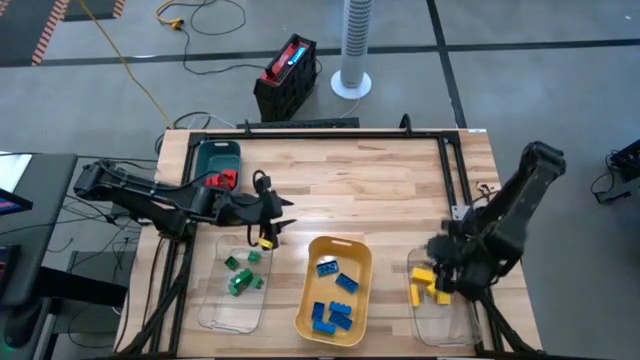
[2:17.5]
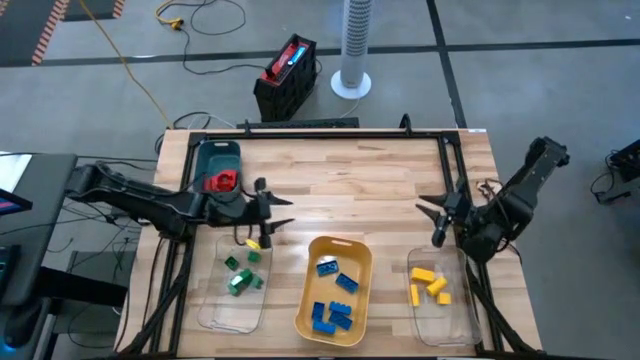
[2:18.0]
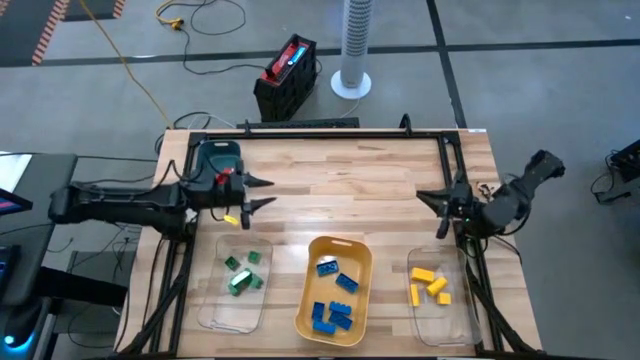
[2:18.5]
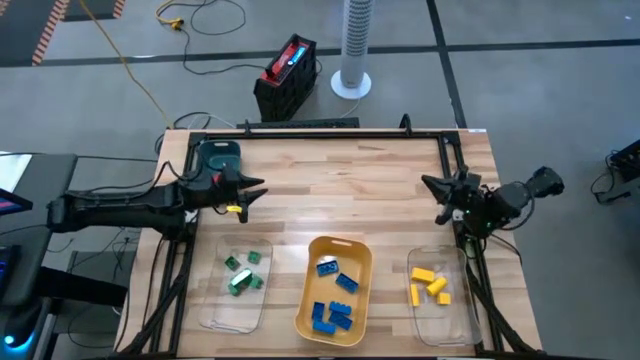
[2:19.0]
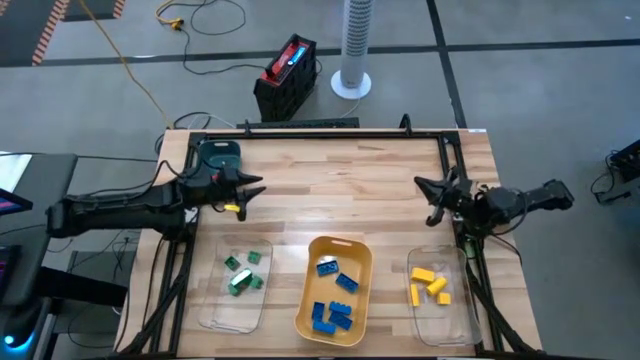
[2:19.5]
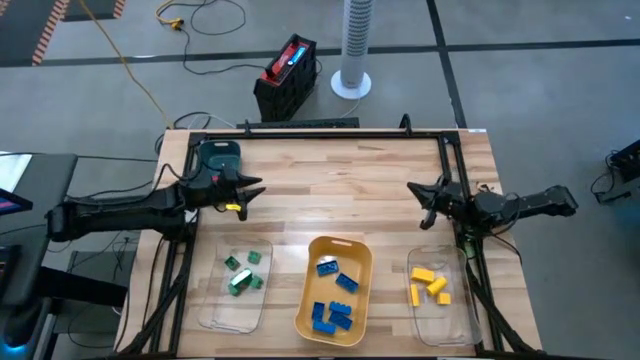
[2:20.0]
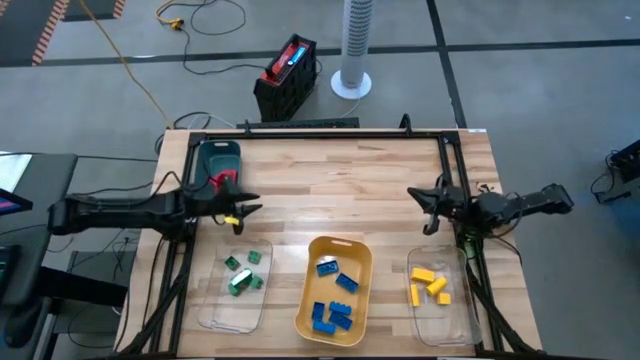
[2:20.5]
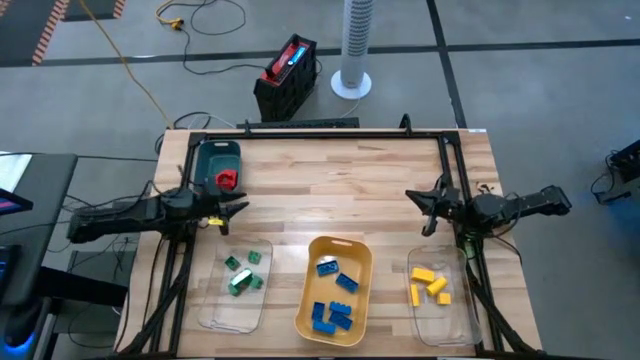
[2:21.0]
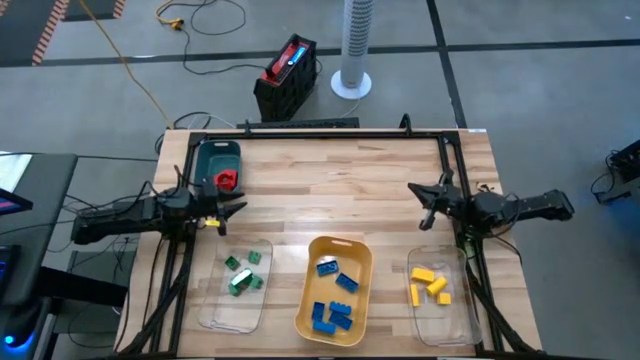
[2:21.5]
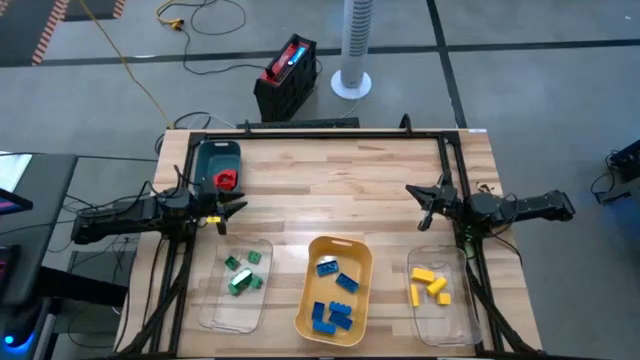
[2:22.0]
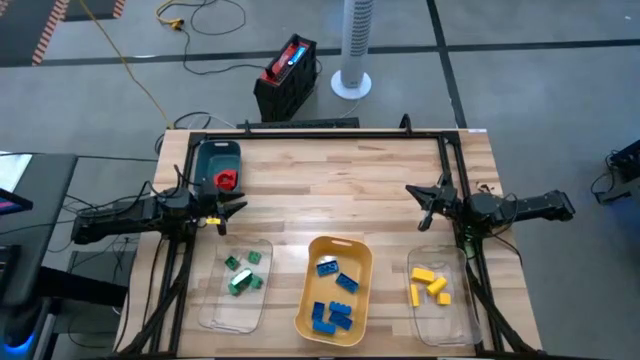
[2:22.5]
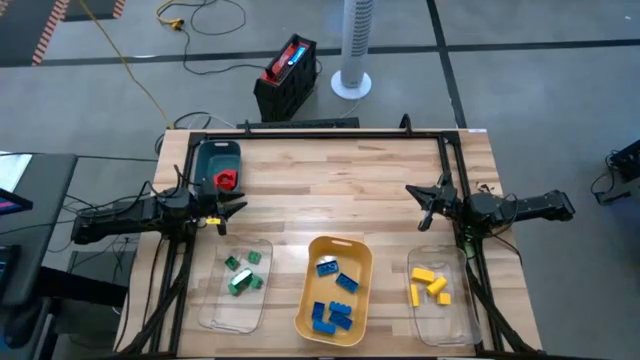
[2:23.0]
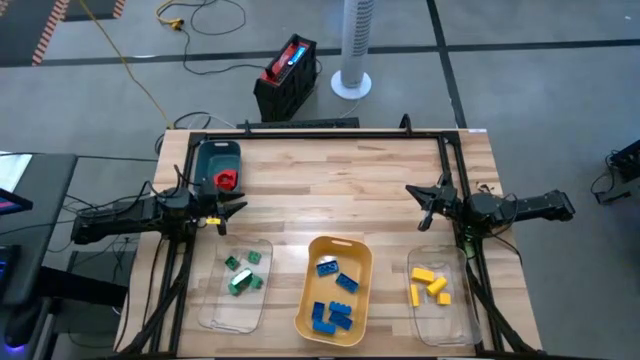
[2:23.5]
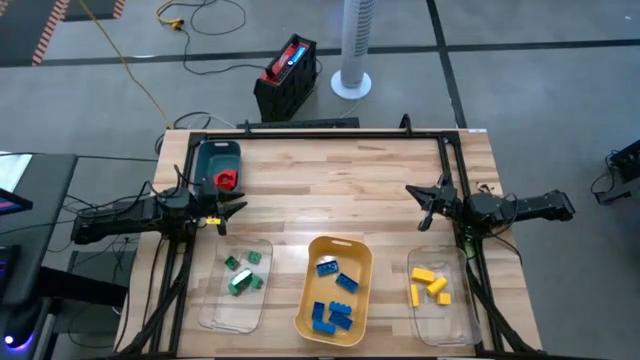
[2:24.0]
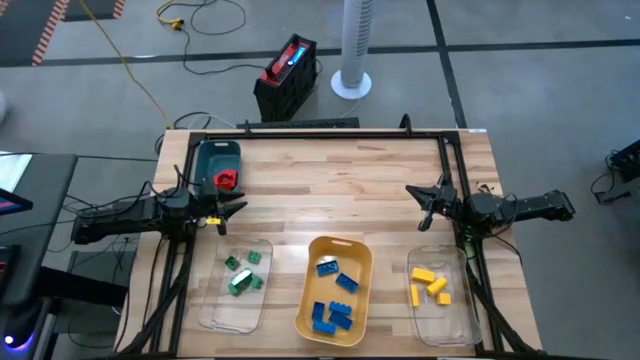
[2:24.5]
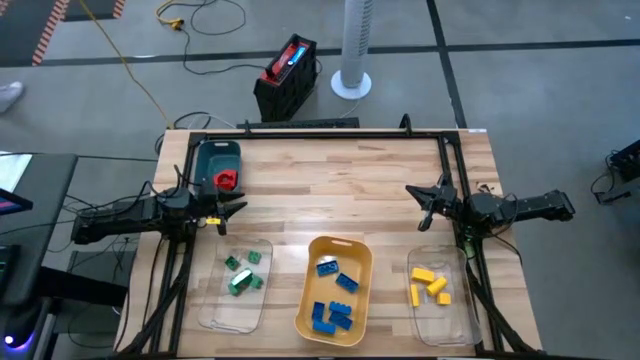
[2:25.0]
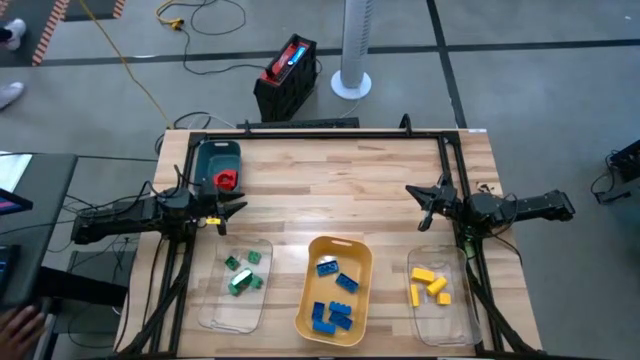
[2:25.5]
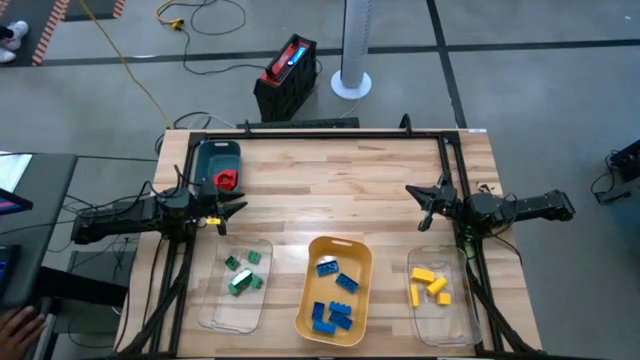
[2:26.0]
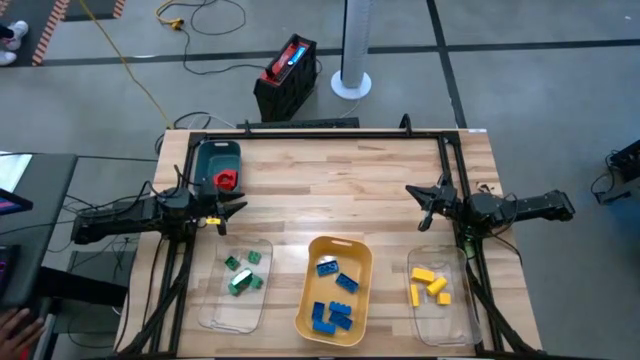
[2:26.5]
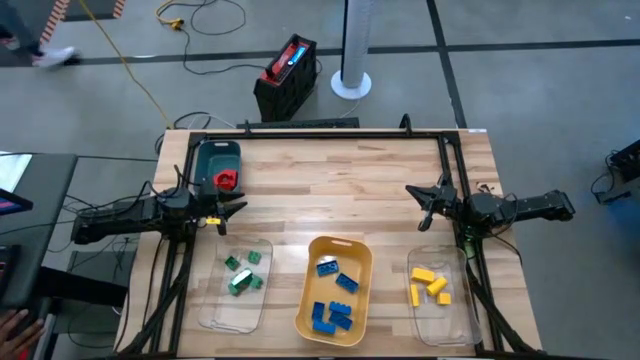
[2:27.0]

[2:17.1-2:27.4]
Task: Sort blocks
Return to Home Position

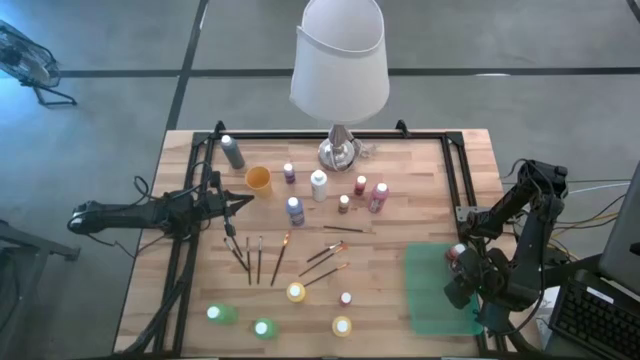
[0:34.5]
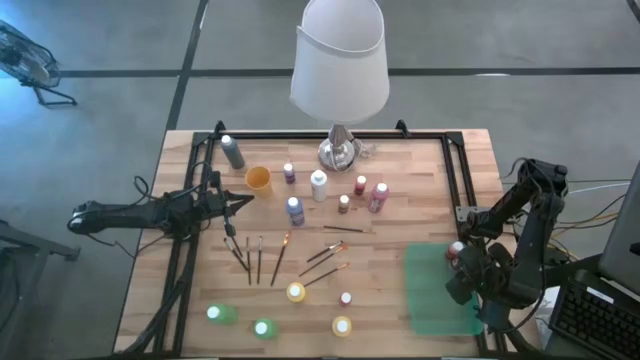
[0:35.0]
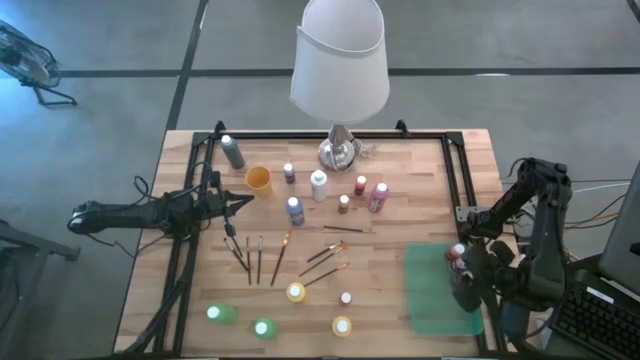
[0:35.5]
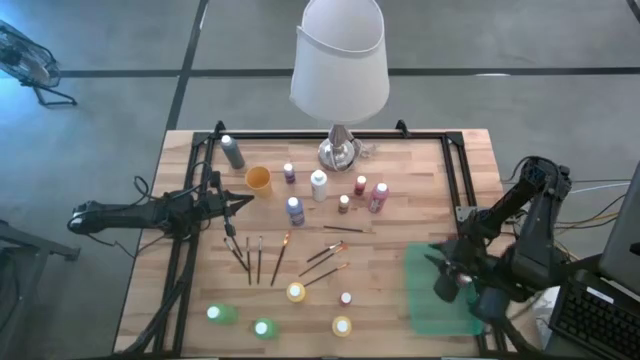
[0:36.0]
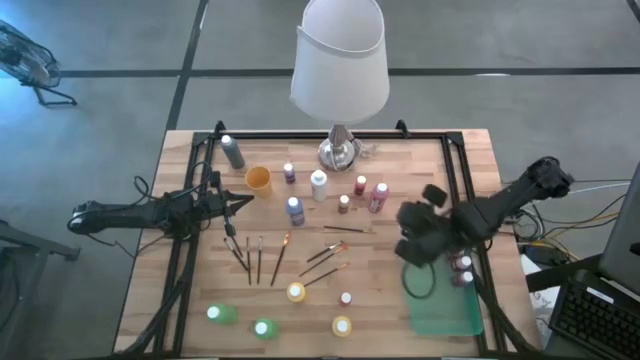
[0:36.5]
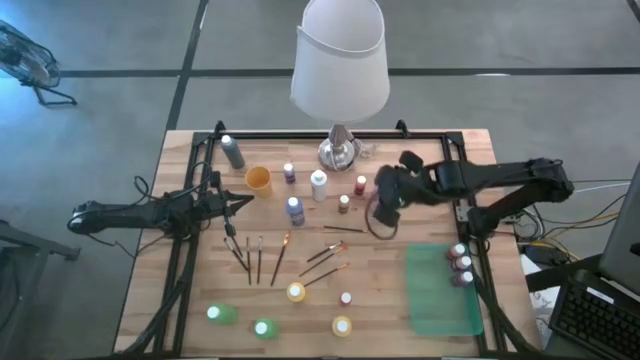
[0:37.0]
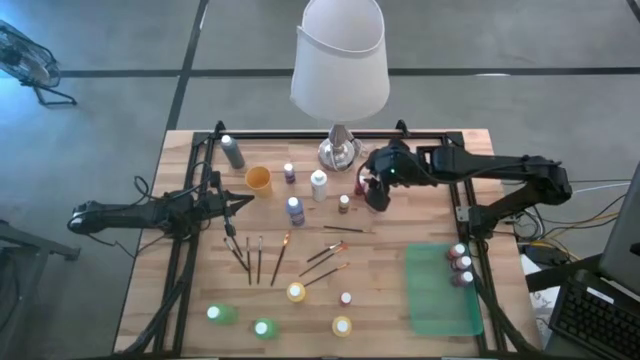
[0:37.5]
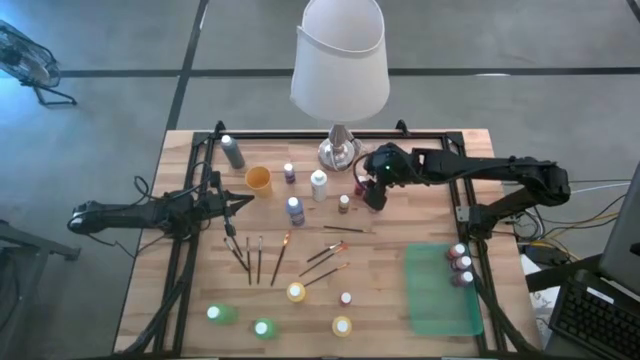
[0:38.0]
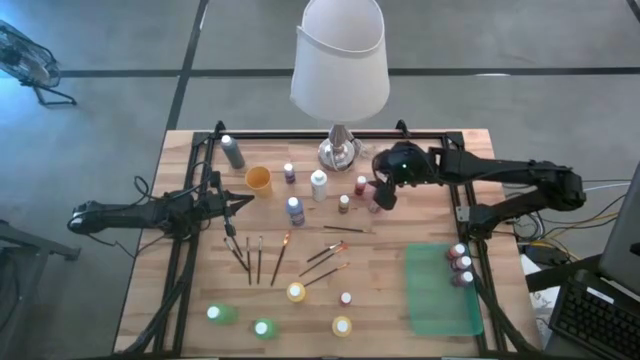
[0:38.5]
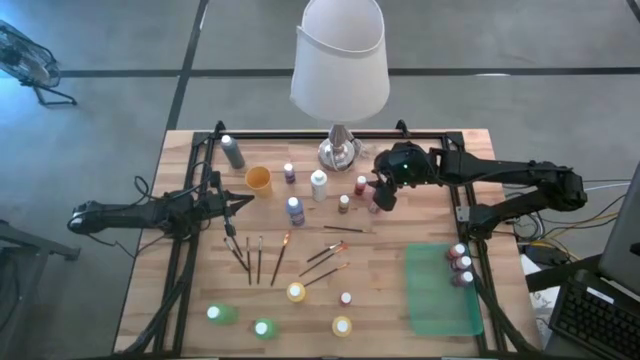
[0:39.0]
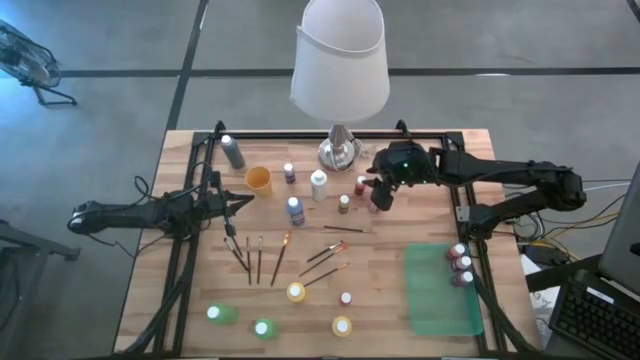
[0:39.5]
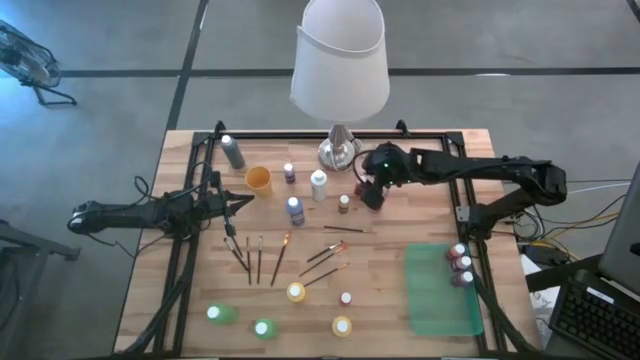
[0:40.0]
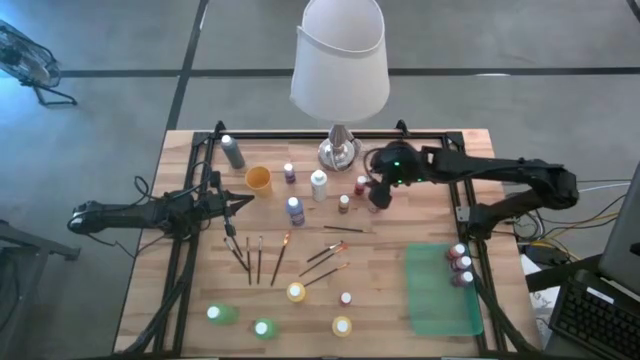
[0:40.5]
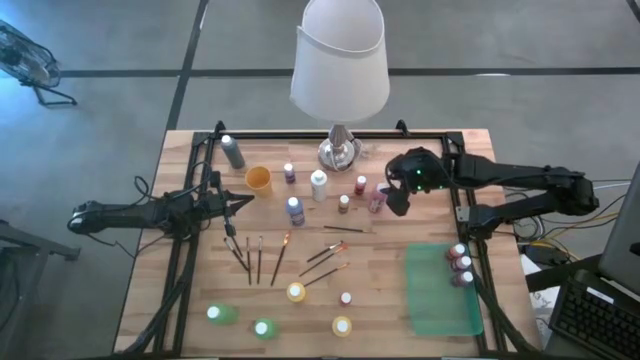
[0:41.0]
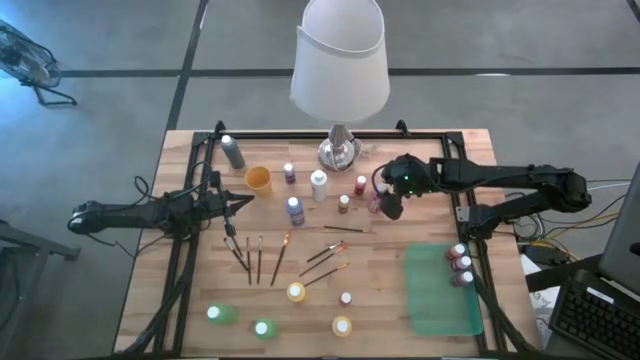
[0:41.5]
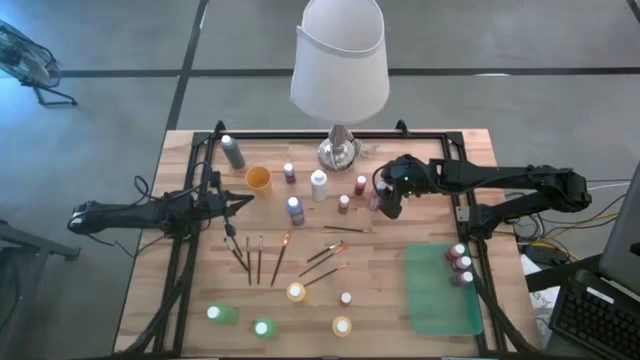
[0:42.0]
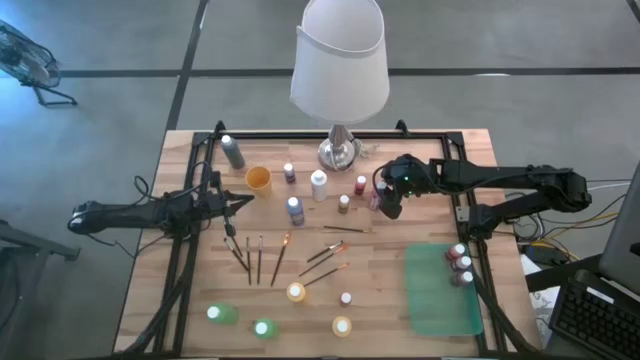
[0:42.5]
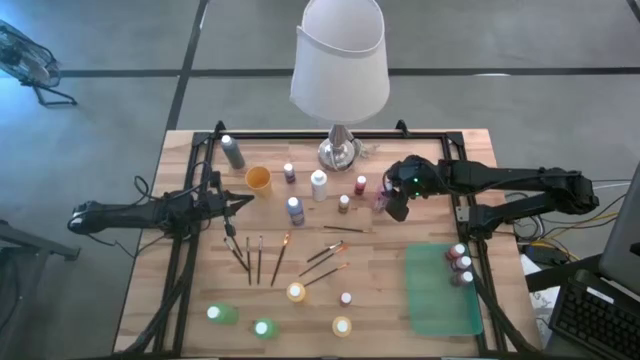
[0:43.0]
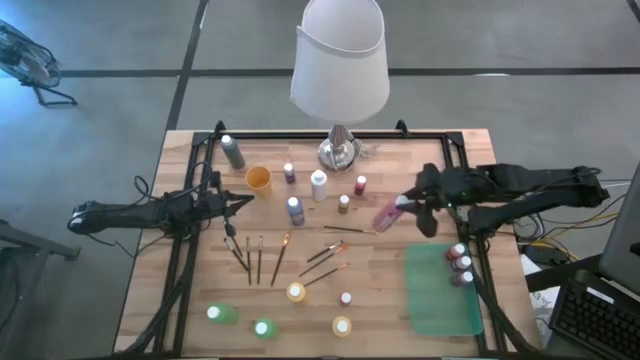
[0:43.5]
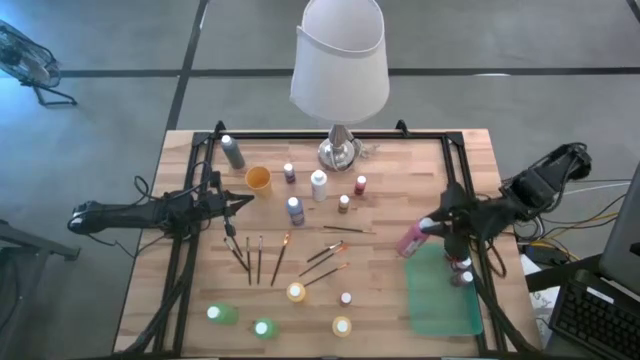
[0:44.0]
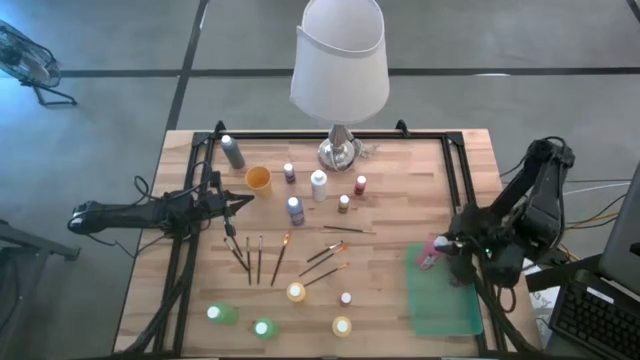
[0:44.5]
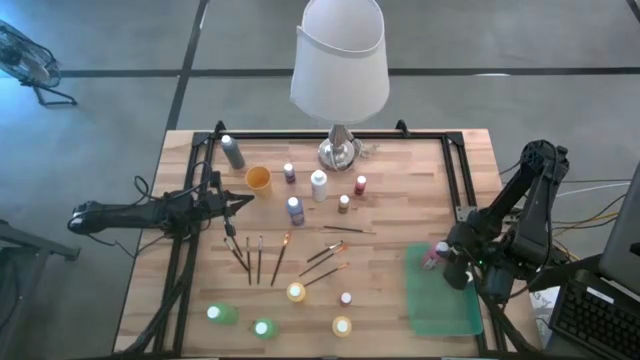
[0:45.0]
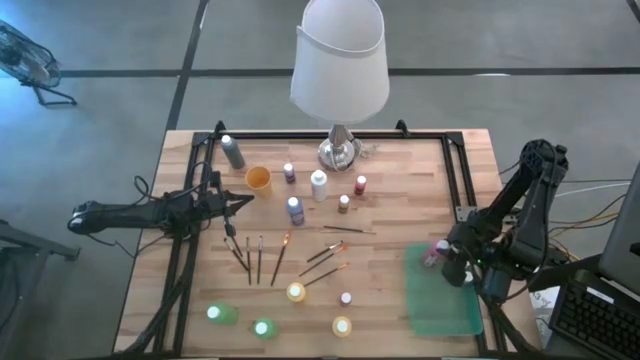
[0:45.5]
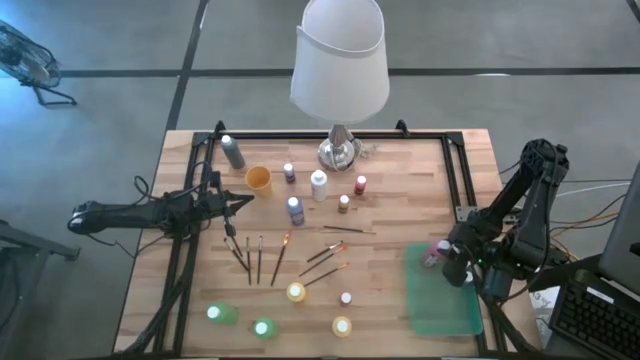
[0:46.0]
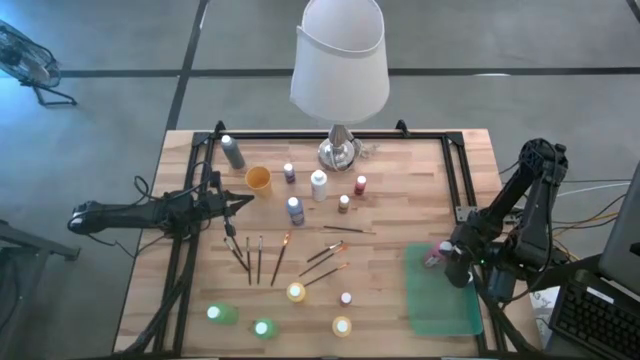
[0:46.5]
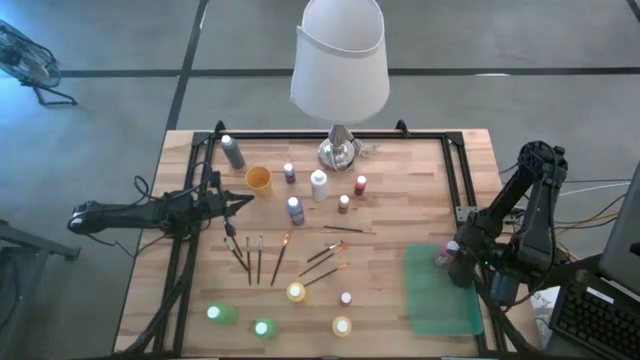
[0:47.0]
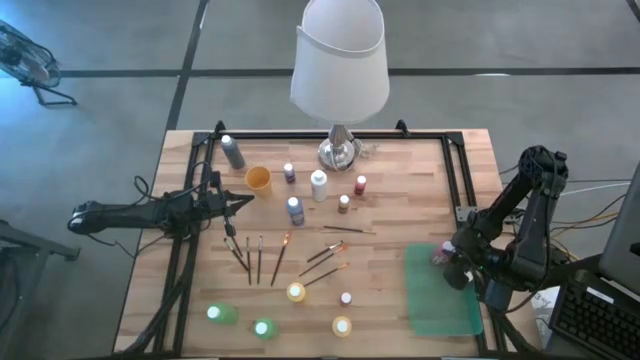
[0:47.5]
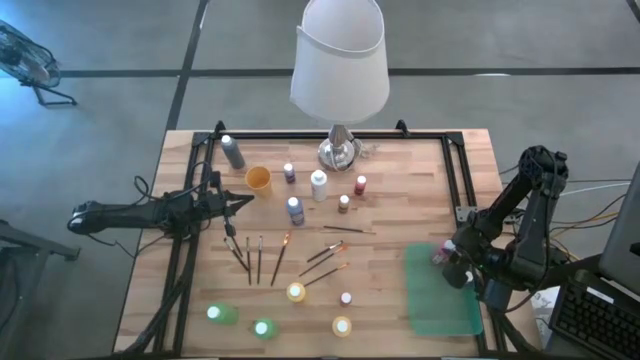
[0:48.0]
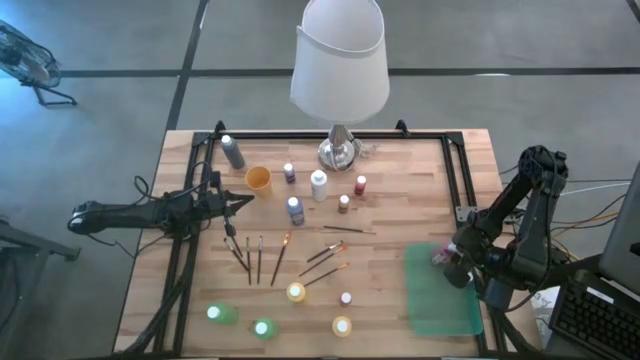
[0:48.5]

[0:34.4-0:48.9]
Task: Pick & Place Paint Supplies
Put the pink paint bottle into the green bin
